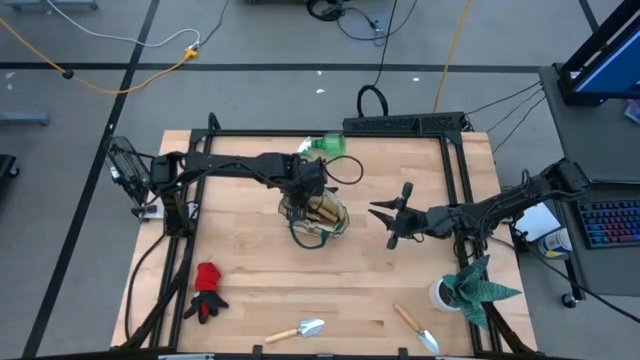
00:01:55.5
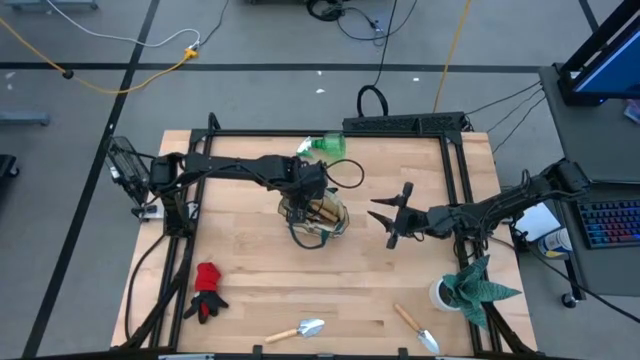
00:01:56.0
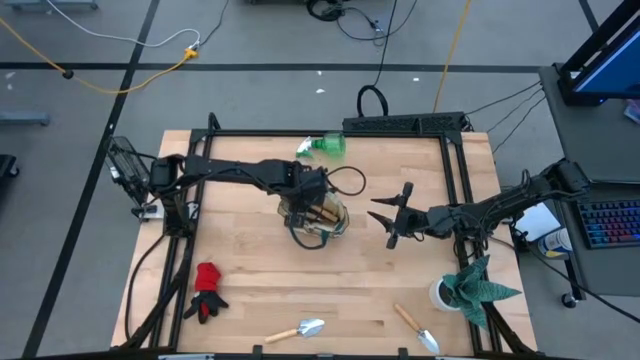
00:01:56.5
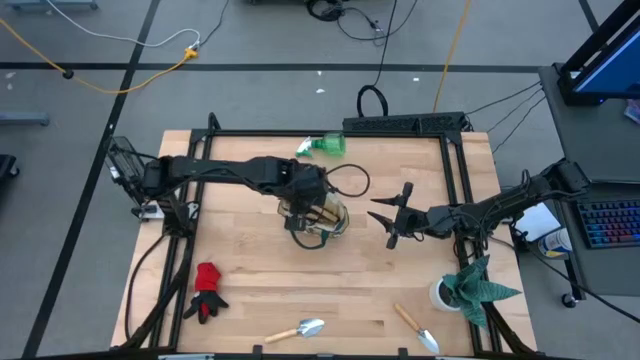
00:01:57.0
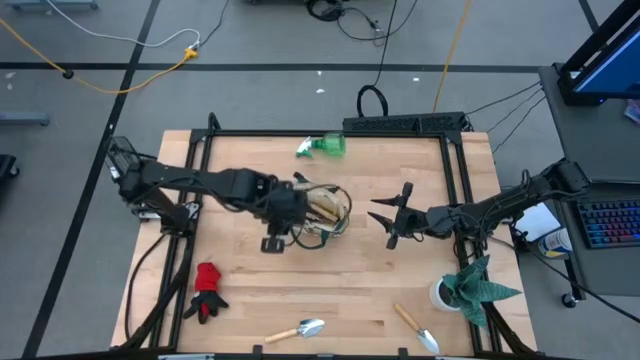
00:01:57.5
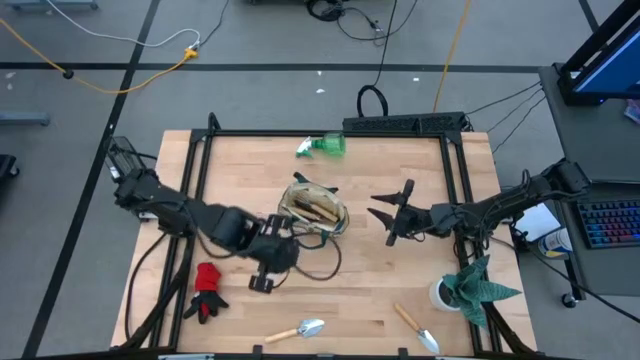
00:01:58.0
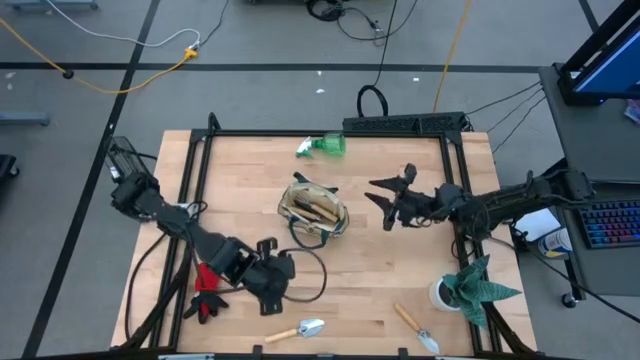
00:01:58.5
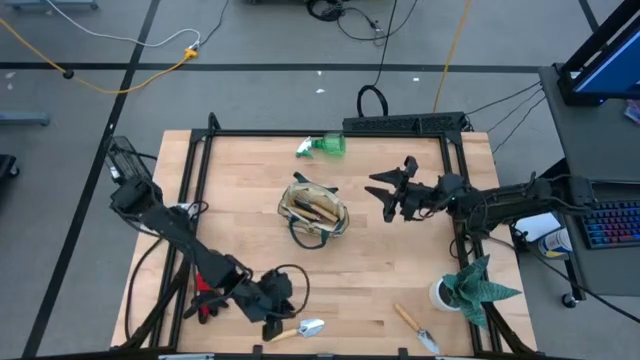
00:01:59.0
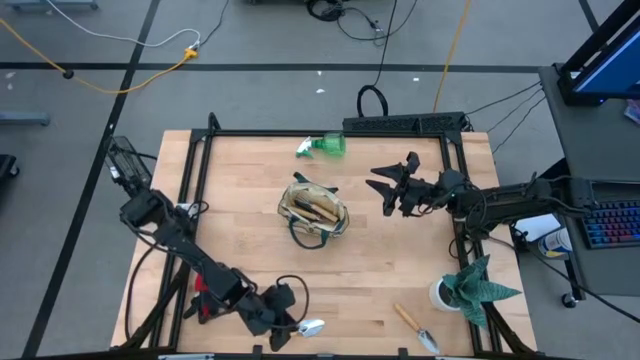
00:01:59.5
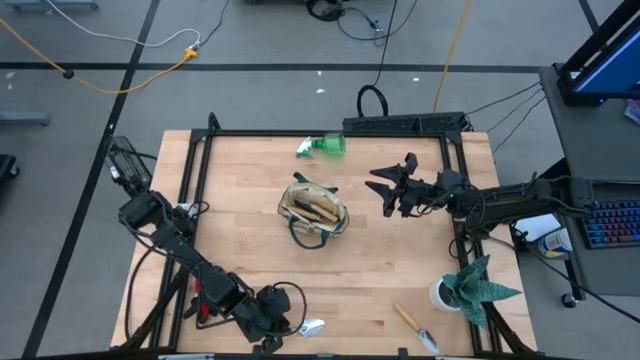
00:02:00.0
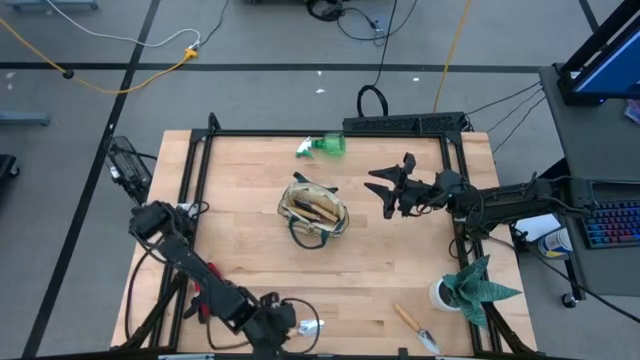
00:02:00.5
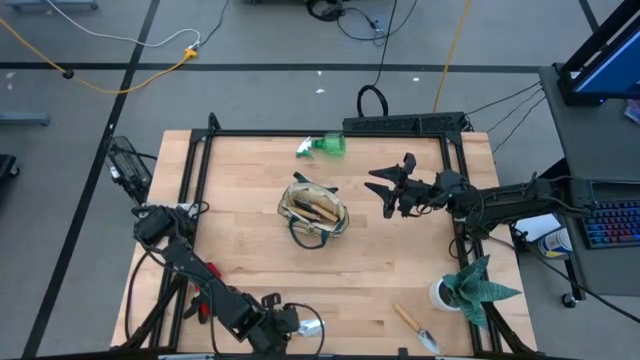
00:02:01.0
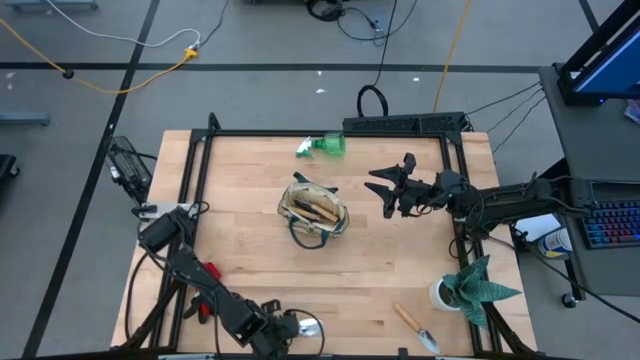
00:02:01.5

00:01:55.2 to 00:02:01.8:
Task: Pick & Place Garden tools in Gardening bag
Put the left brown trowel into the brown gardening bag

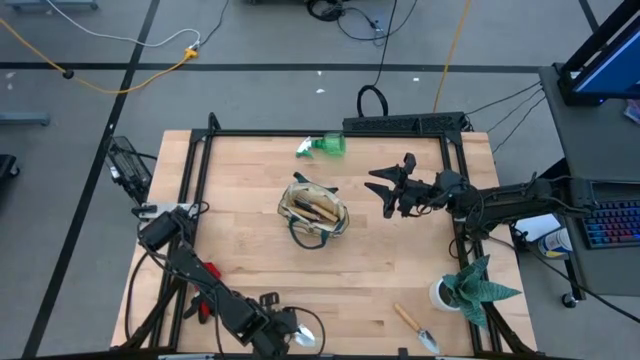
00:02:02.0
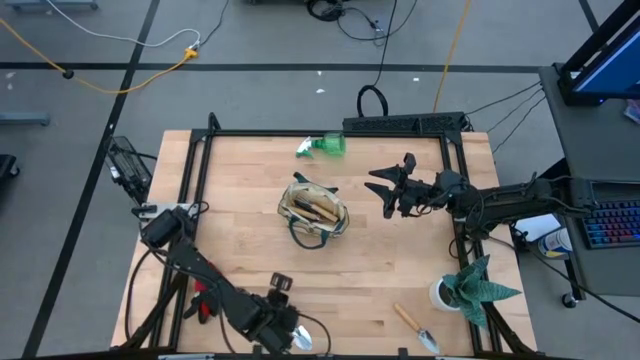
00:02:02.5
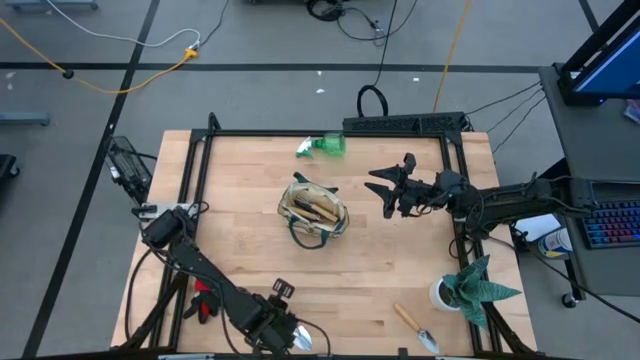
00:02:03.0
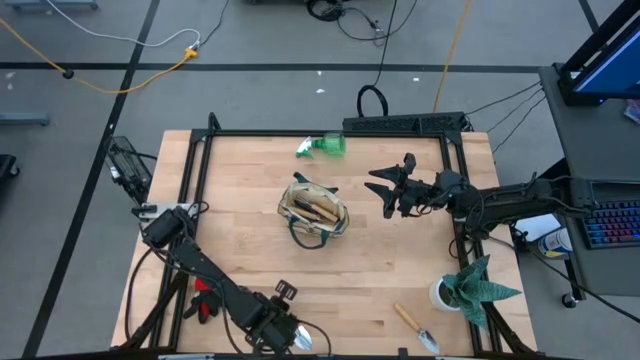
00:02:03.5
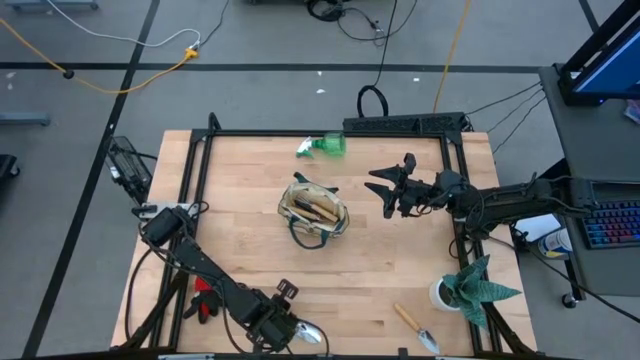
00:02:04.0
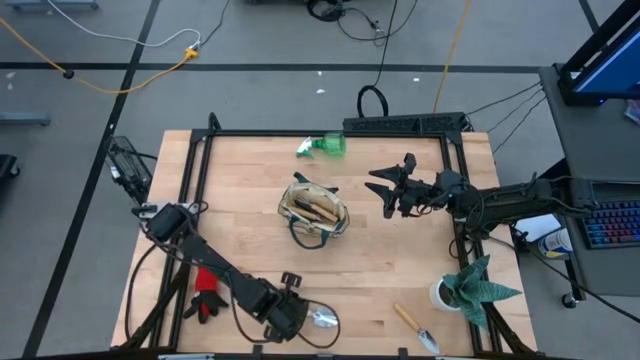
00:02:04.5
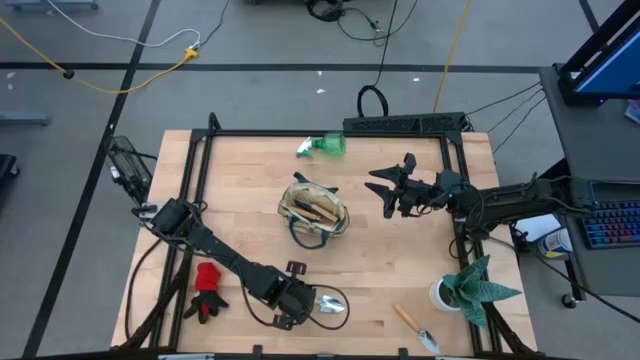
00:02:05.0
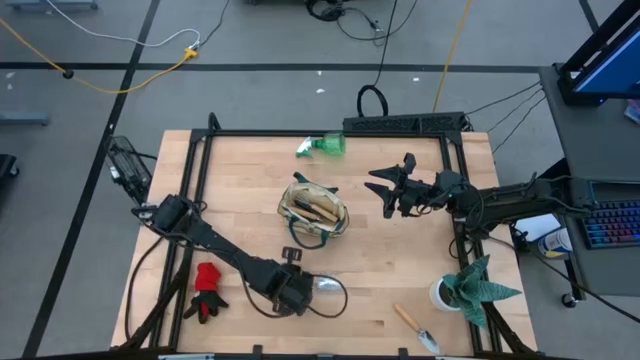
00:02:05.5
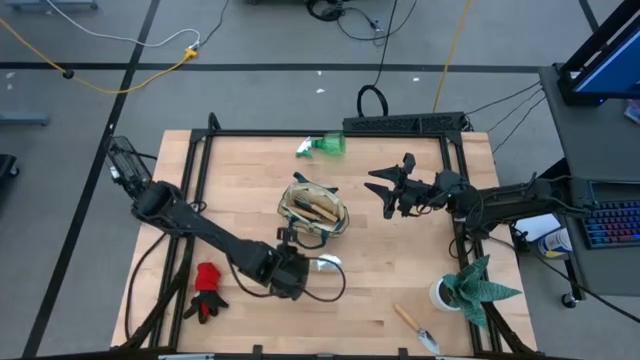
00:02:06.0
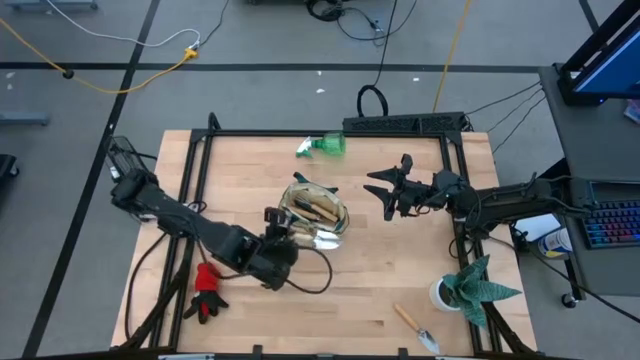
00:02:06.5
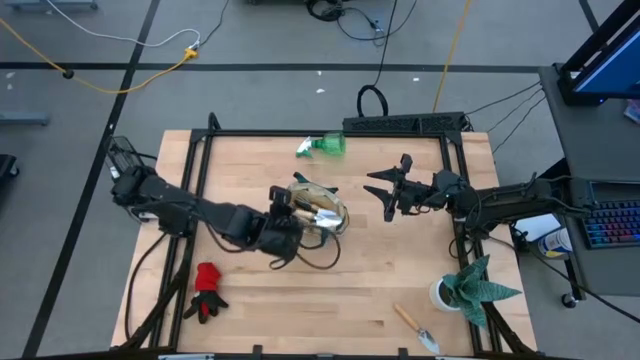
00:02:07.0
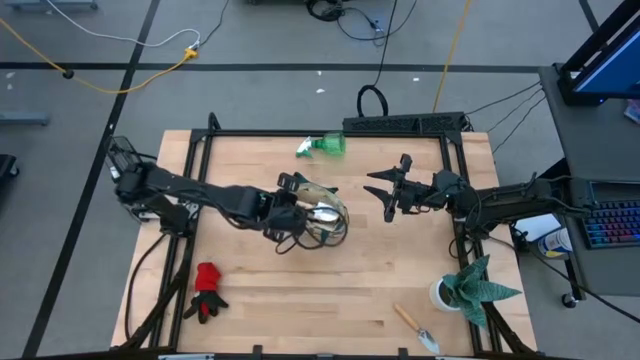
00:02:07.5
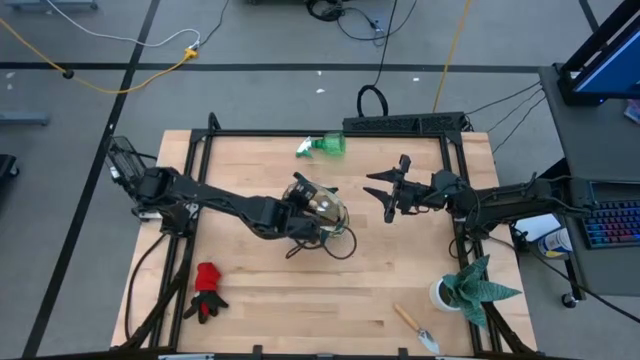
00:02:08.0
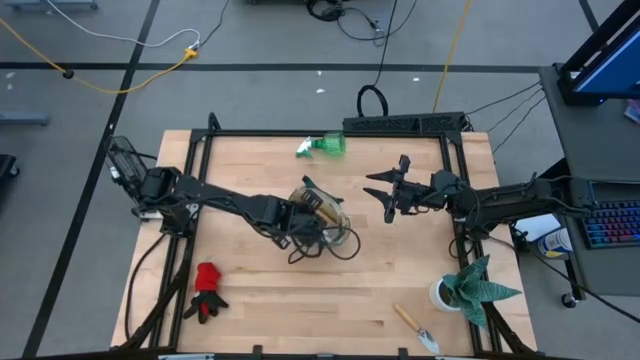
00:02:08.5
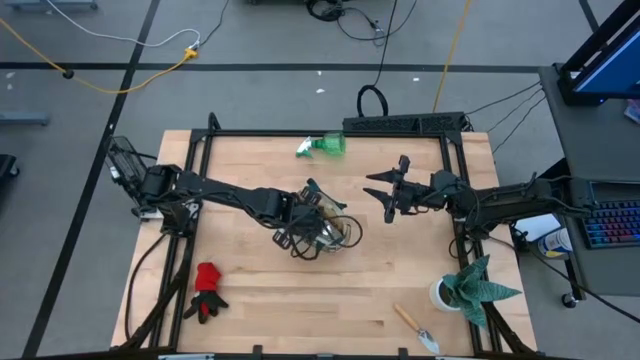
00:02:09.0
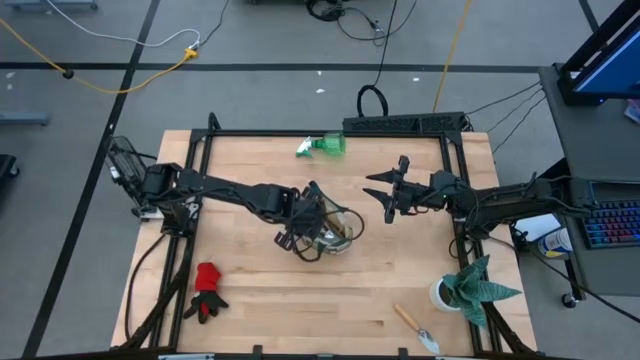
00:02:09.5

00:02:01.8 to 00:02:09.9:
Put the left brown trowel into the brown gardening bag

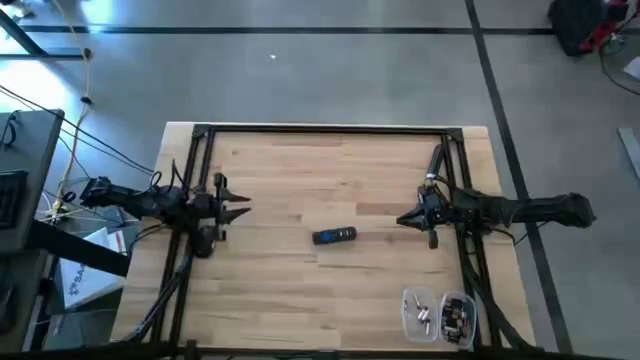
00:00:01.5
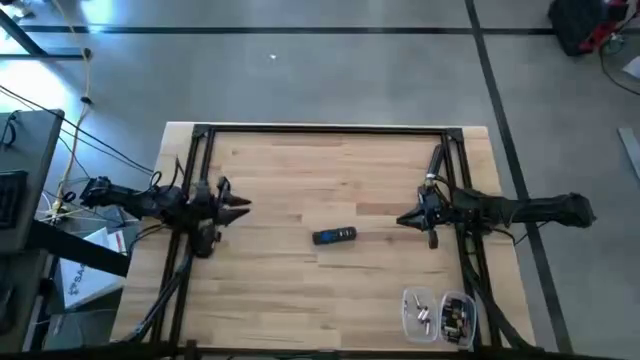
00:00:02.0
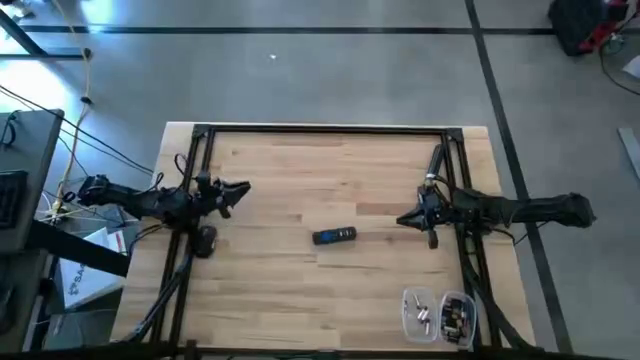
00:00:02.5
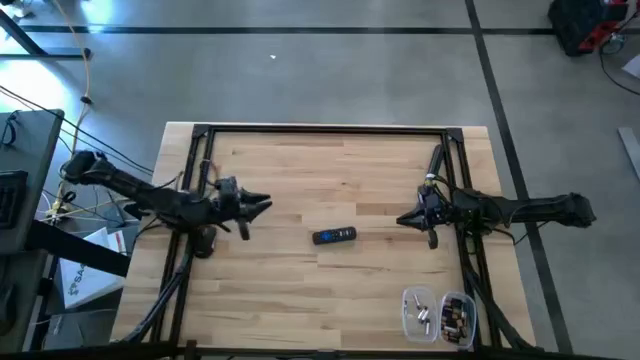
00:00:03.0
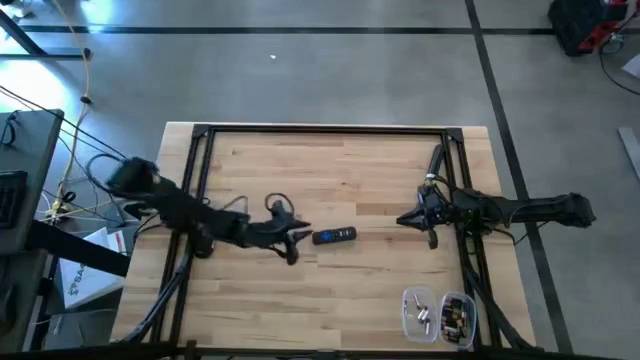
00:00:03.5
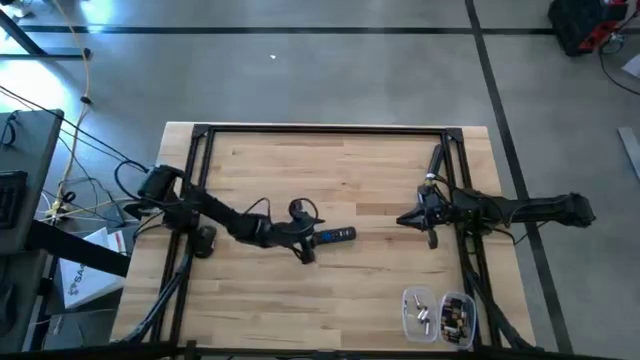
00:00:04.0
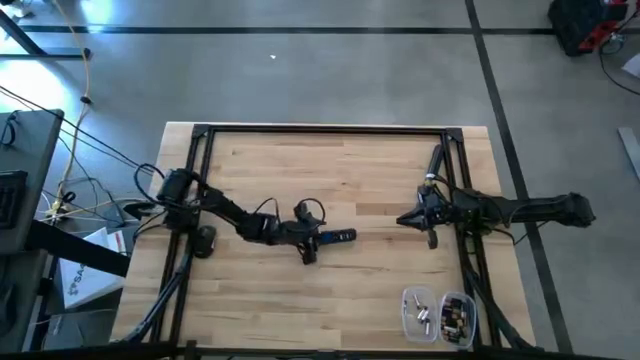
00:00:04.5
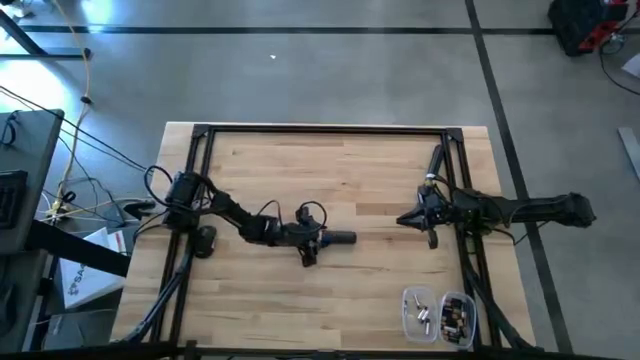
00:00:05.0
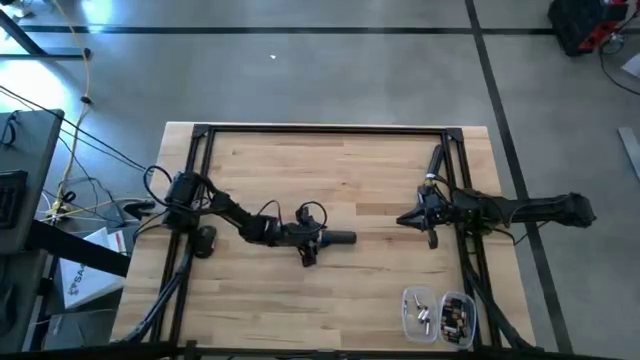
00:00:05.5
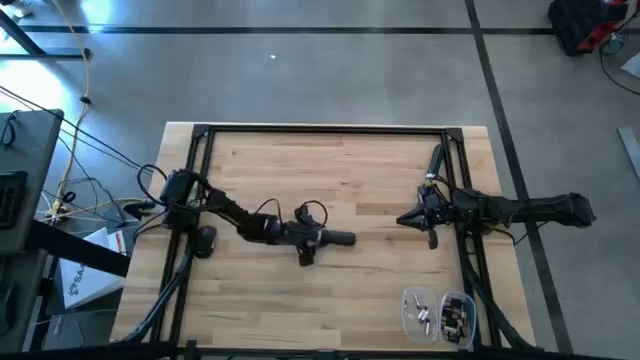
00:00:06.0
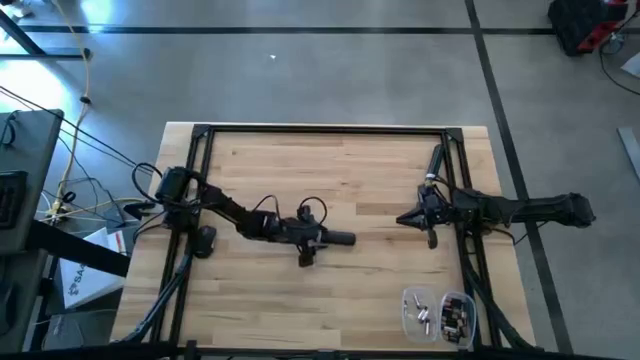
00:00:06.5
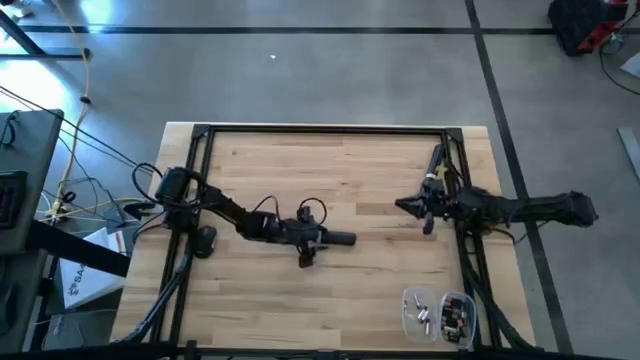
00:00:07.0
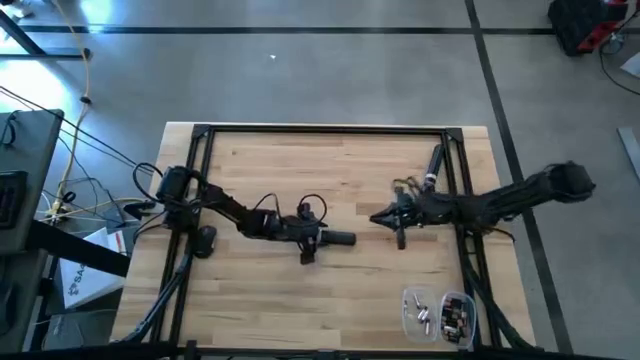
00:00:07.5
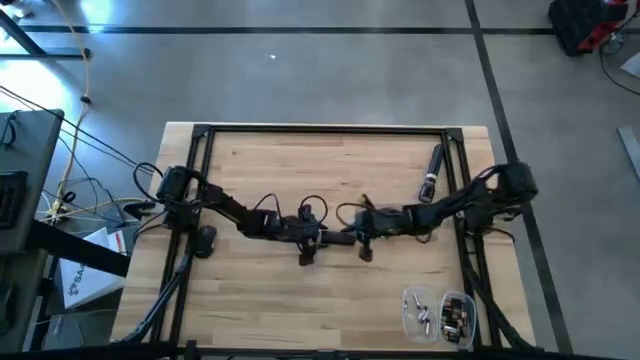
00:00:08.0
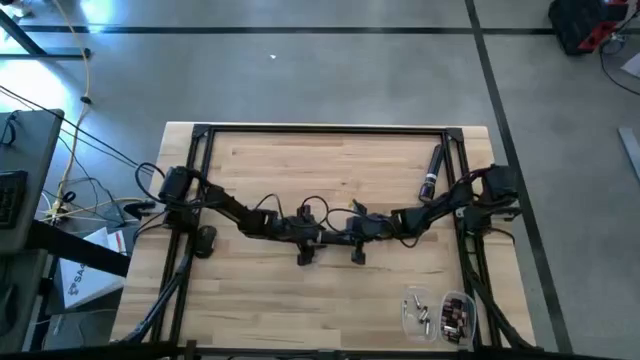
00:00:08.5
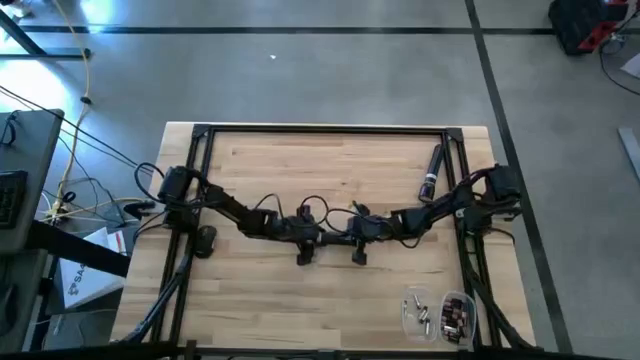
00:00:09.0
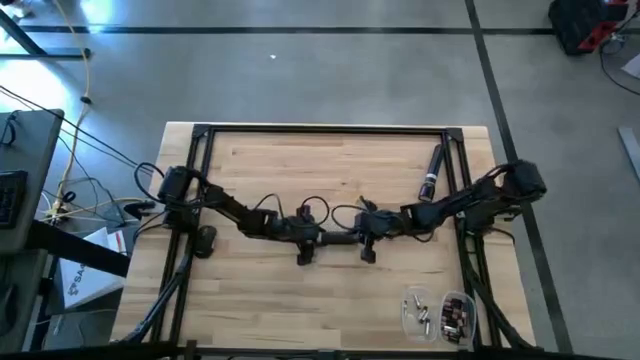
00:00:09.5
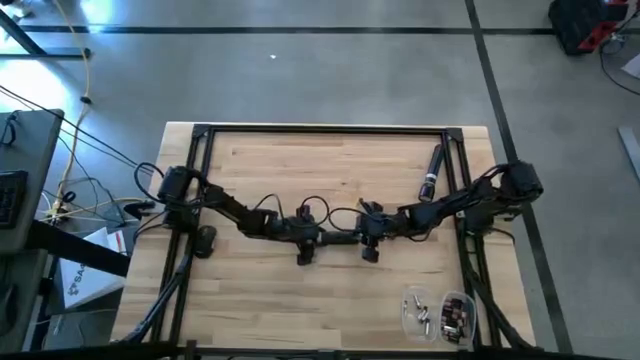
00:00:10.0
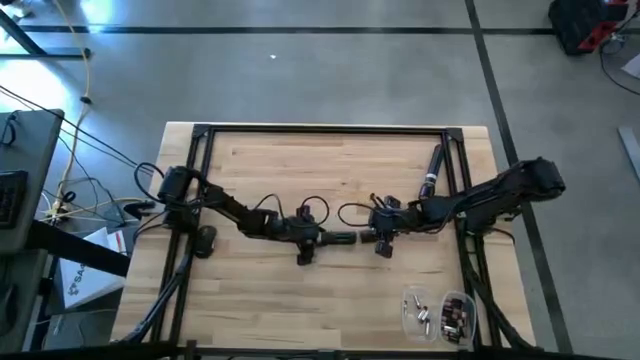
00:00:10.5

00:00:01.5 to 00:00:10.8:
Task: Insert battery
Open the remote cover
